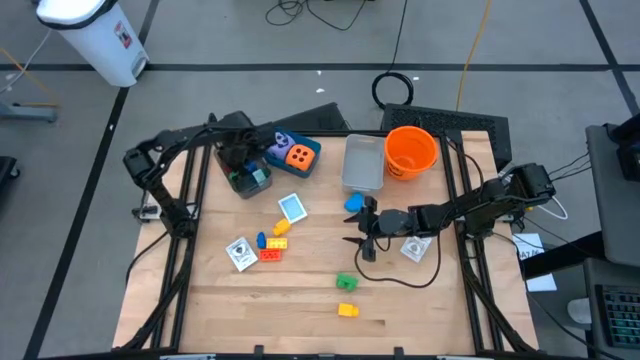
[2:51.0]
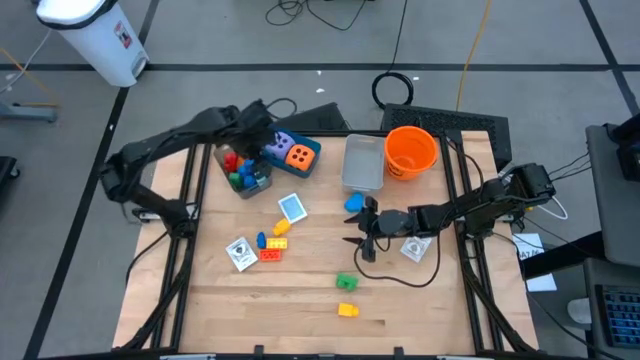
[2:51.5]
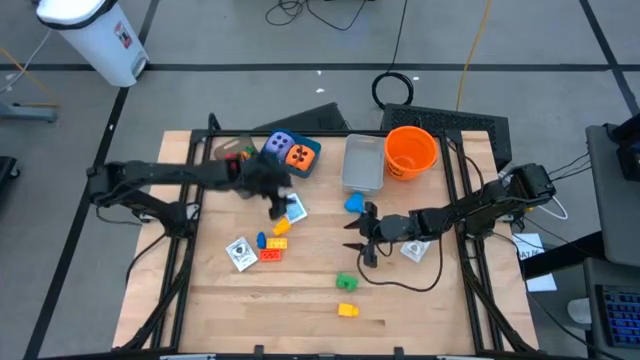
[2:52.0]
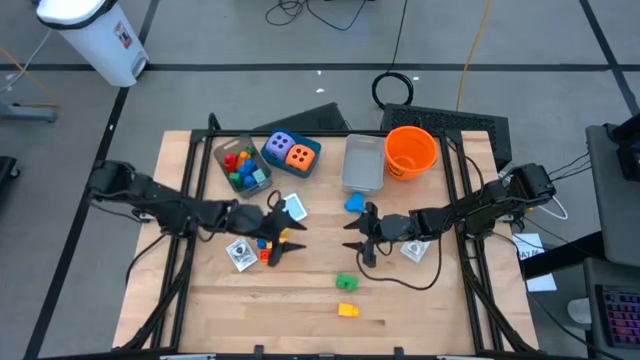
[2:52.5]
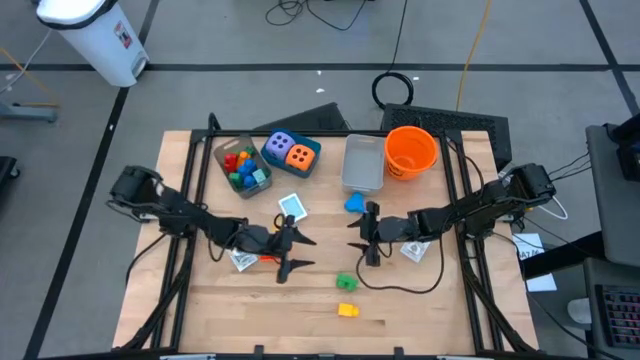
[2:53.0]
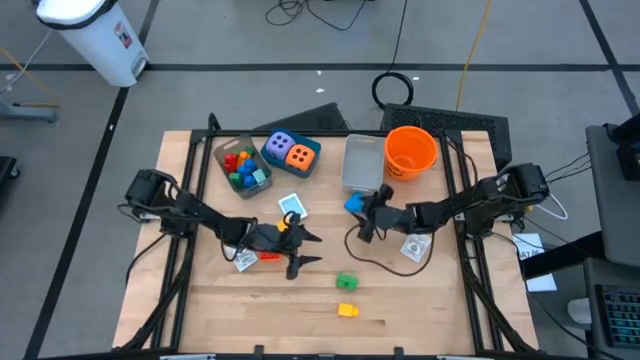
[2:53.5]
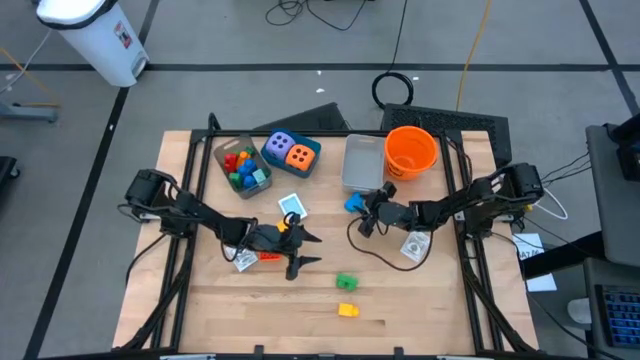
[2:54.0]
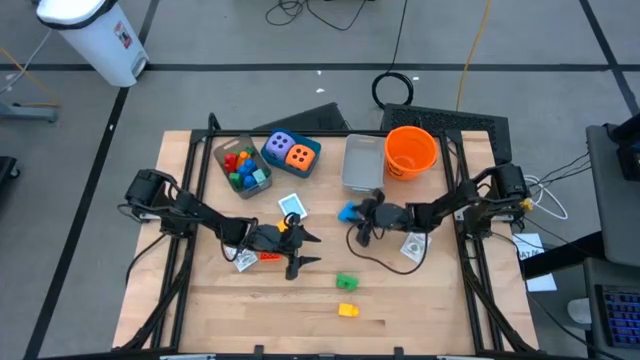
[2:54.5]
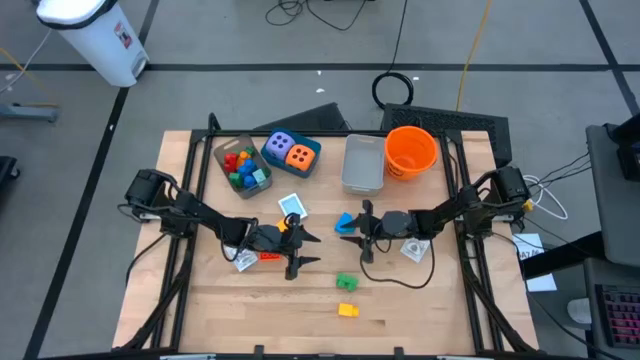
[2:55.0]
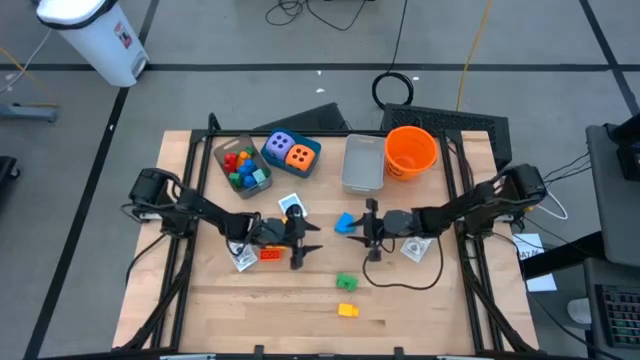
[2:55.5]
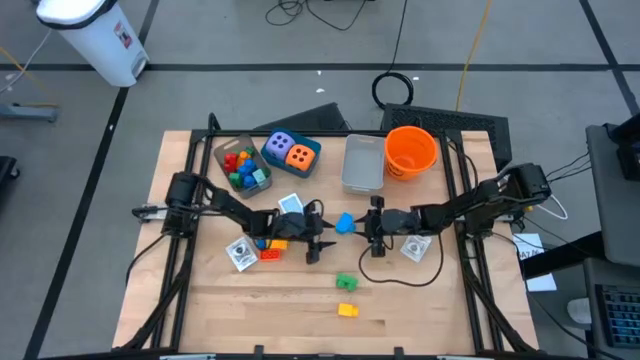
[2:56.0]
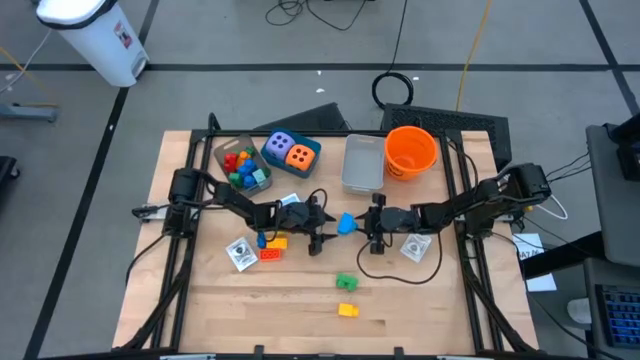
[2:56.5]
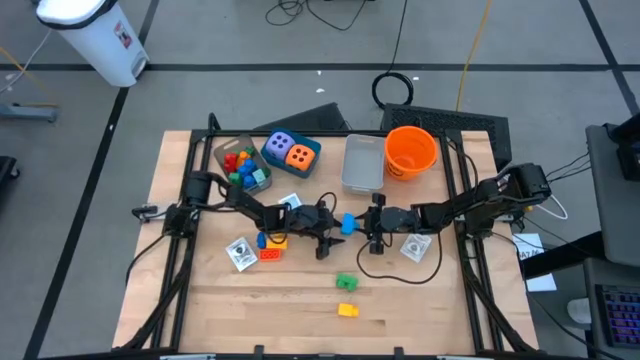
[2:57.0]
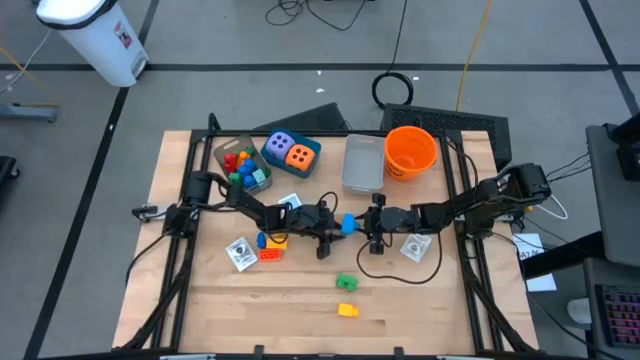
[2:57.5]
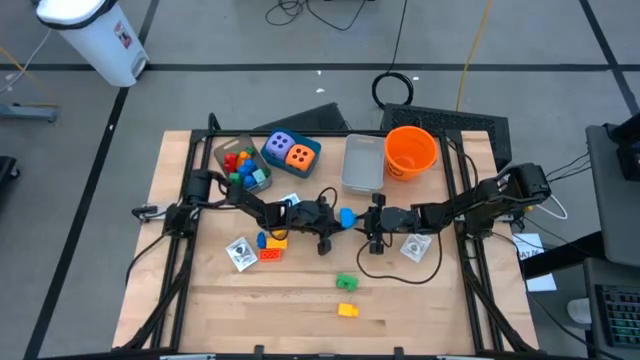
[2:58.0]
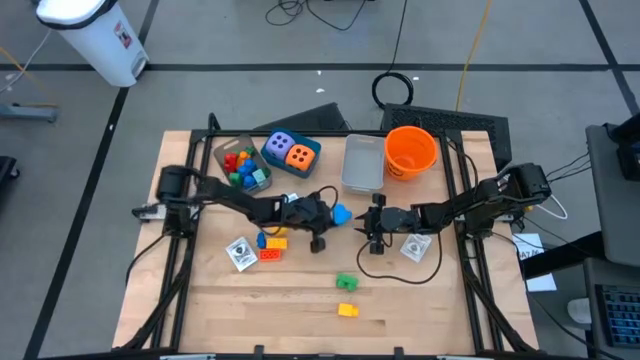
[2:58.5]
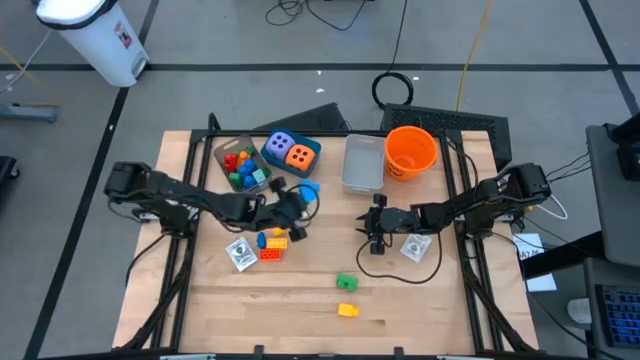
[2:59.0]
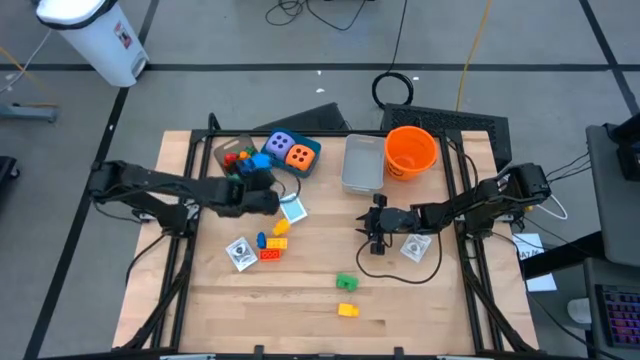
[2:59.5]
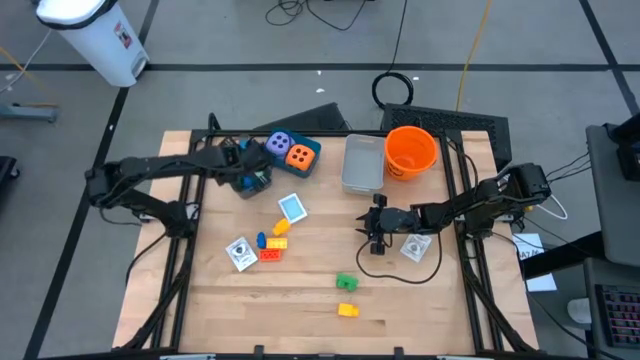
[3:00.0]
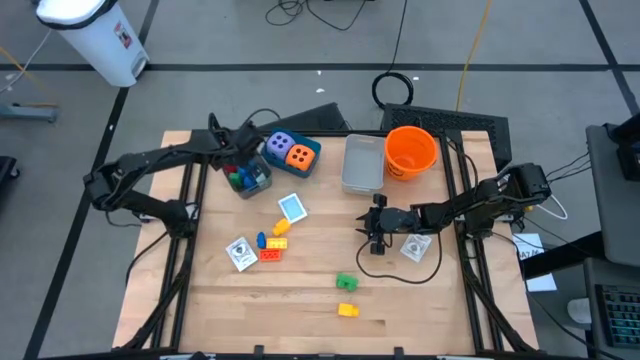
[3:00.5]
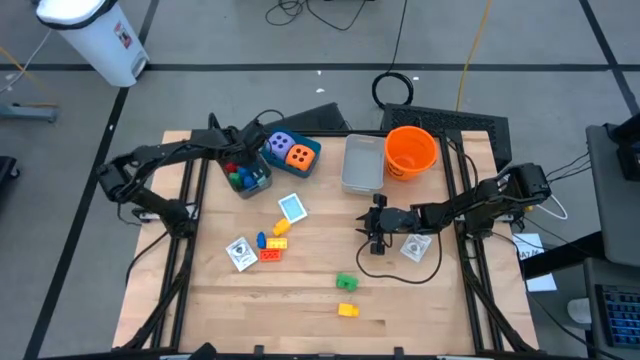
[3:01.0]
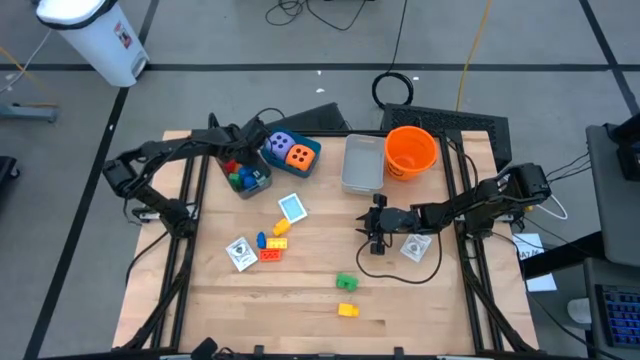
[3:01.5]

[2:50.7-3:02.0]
Task: Pick & Place Toys
Put the blue game piece into the black bin

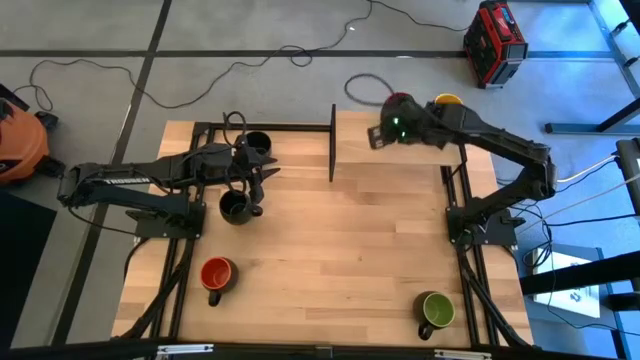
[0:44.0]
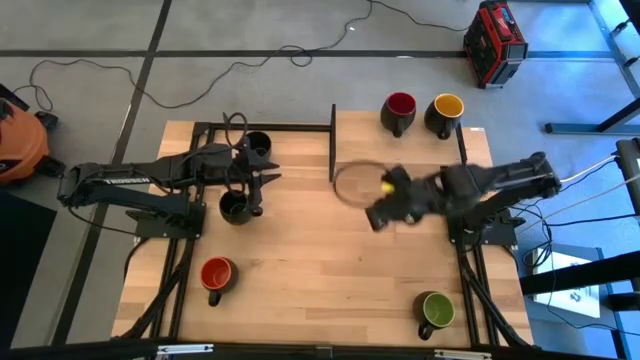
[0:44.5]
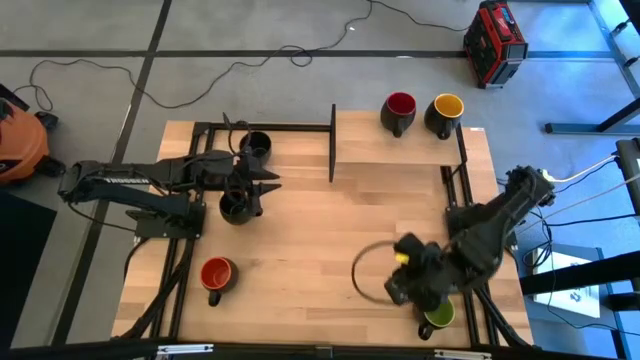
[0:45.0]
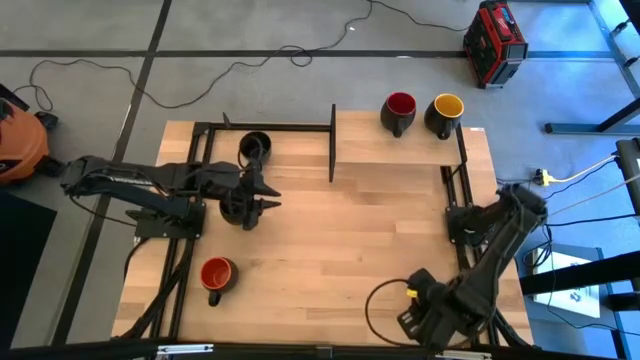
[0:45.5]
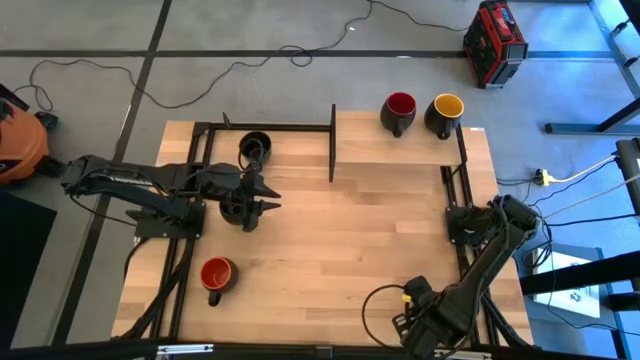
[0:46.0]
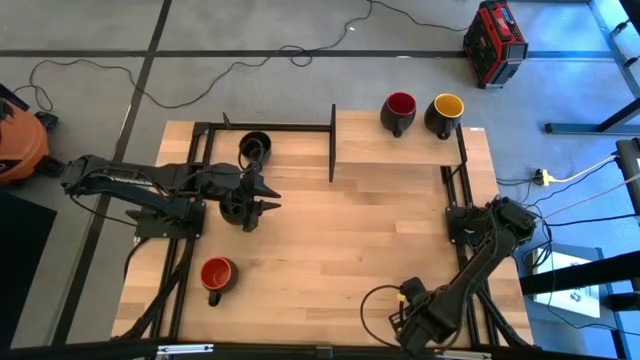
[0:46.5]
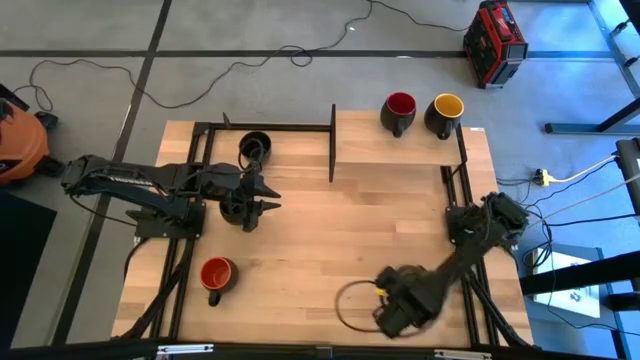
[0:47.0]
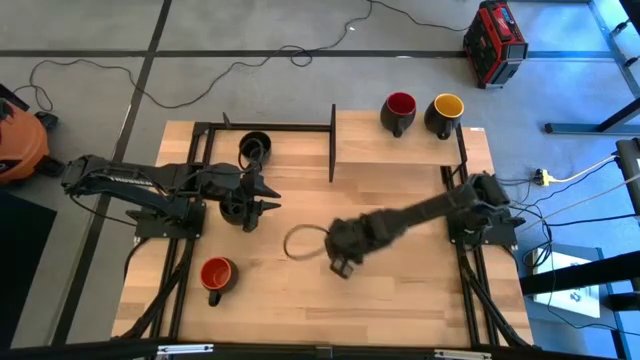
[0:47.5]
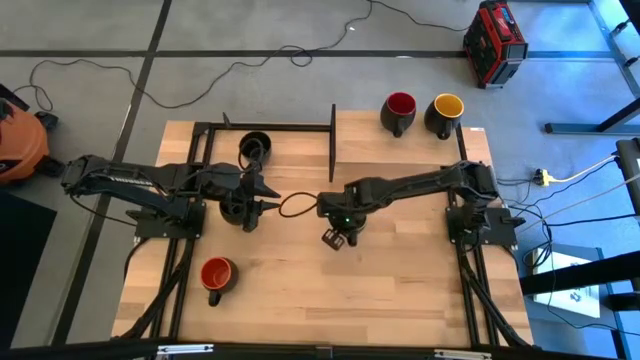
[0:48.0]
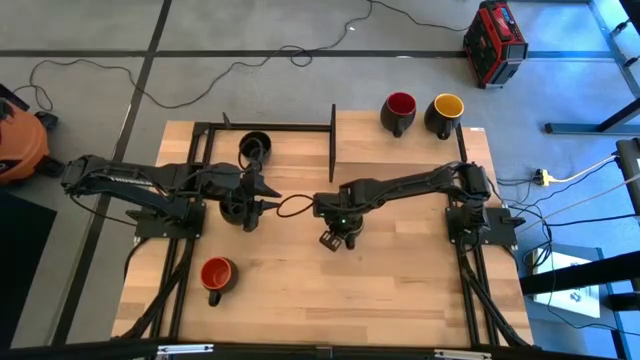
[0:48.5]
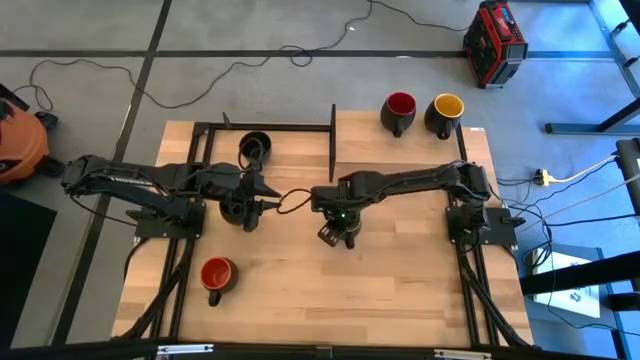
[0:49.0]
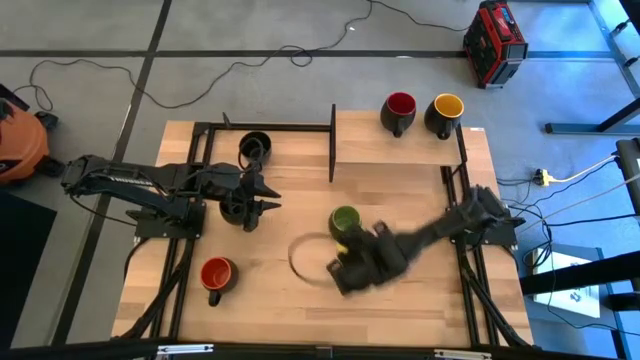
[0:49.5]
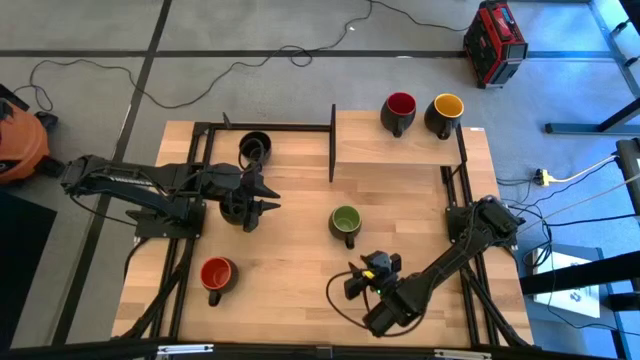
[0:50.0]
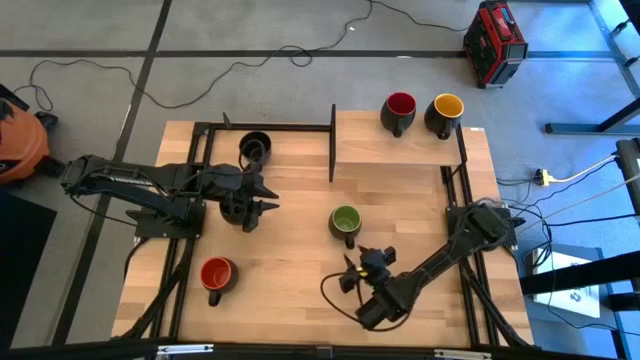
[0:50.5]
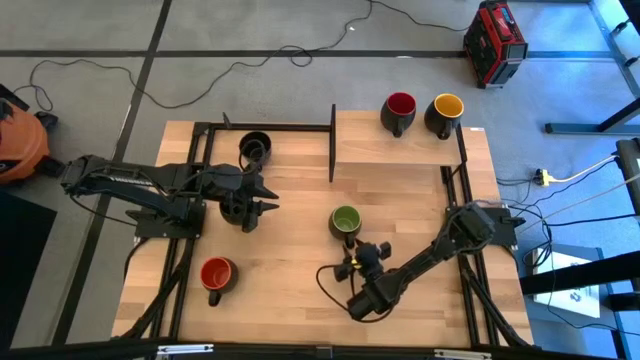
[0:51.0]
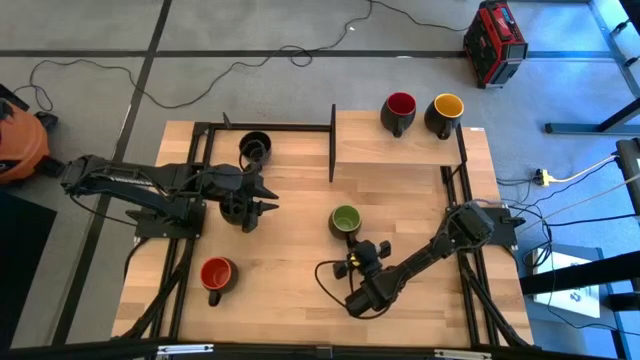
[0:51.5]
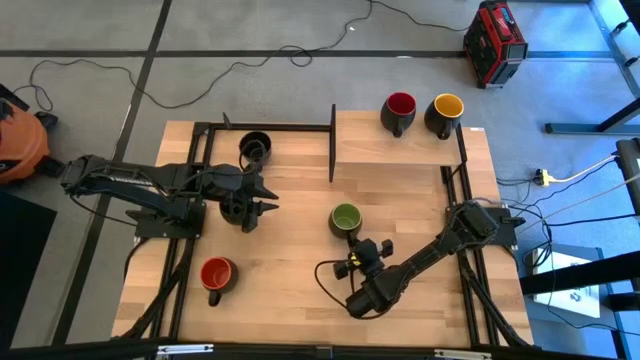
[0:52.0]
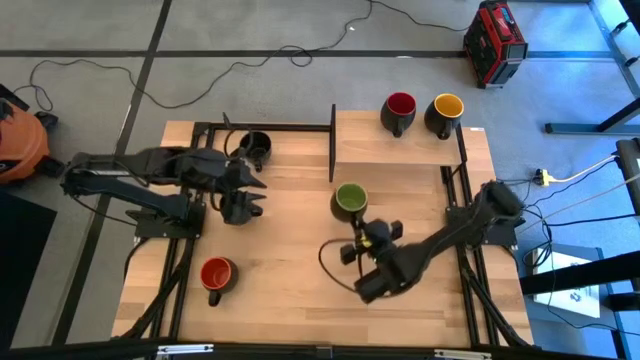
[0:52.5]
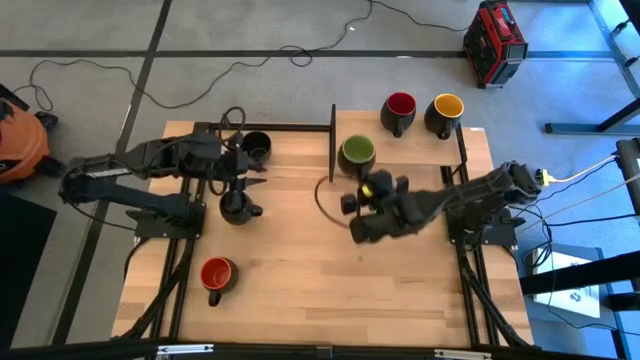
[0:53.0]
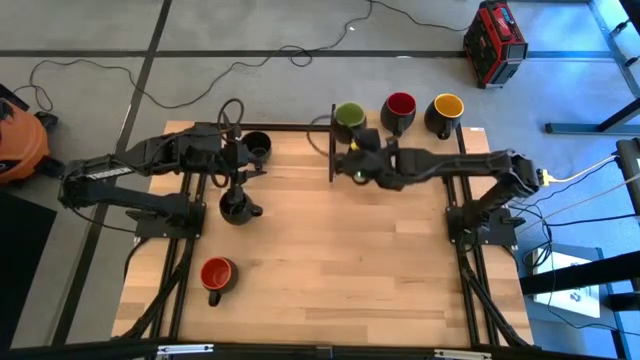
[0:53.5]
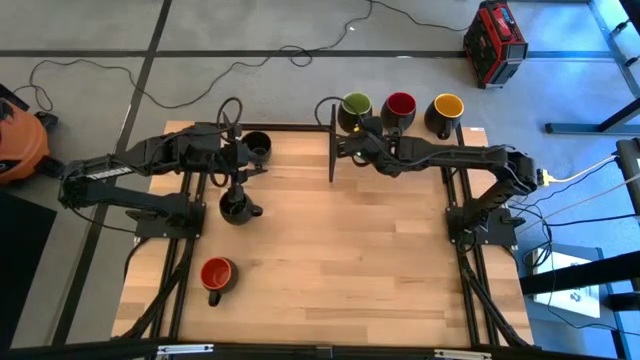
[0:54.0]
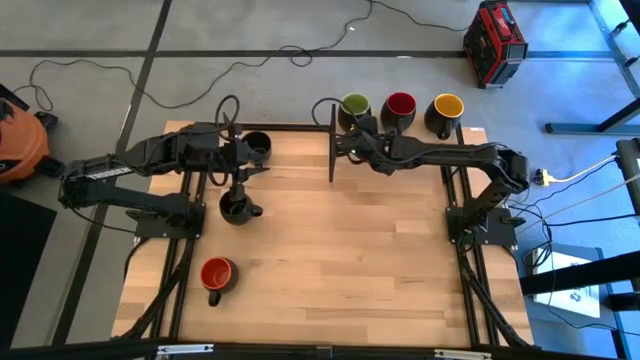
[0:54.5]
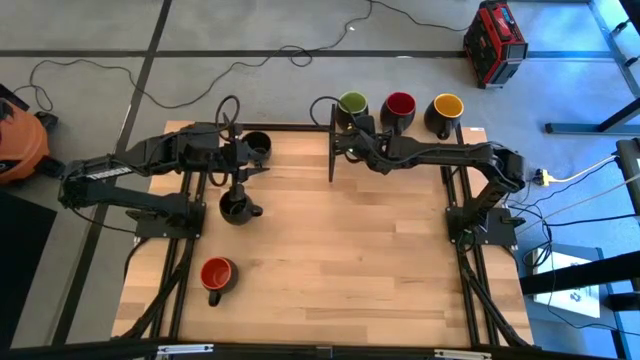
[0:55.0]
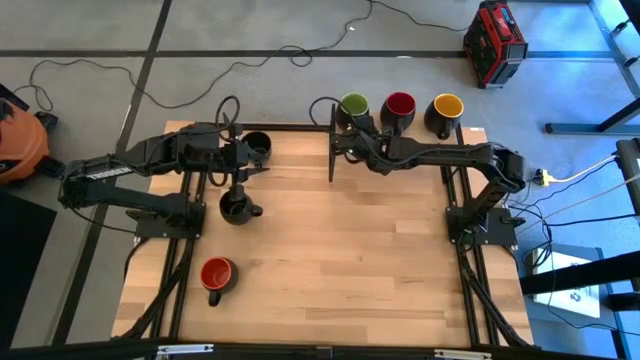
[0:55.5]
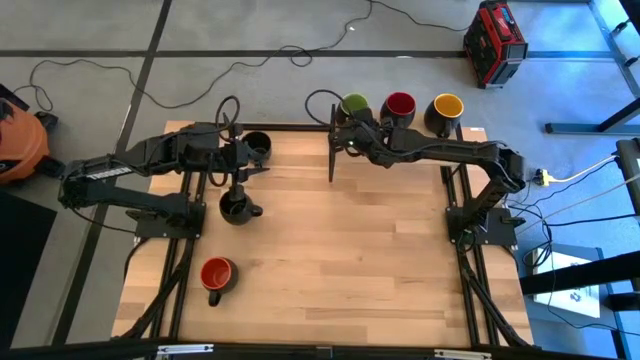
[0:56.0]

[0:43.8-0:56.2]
Task: Place coffee mugs
Put the green mug on the shelf
